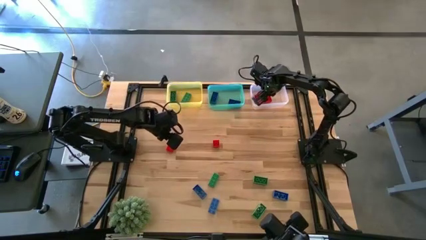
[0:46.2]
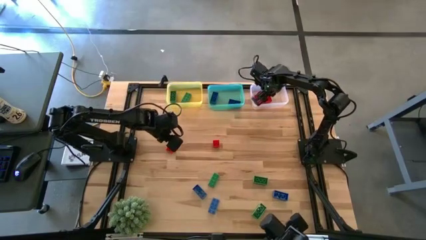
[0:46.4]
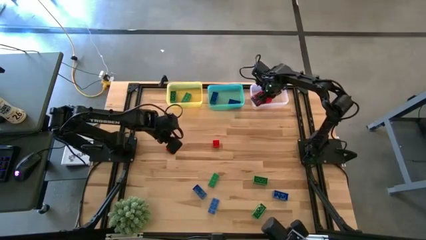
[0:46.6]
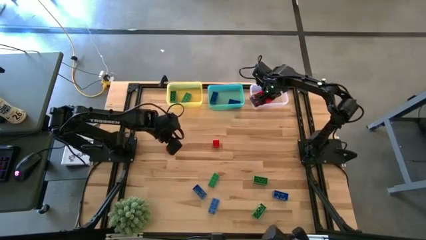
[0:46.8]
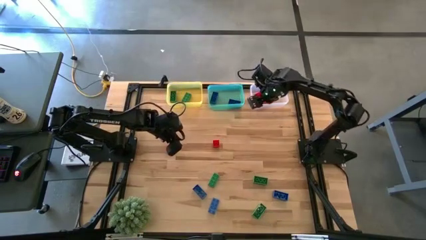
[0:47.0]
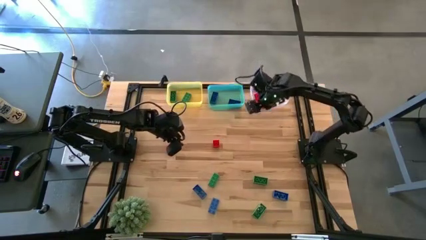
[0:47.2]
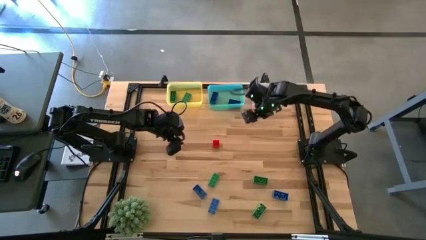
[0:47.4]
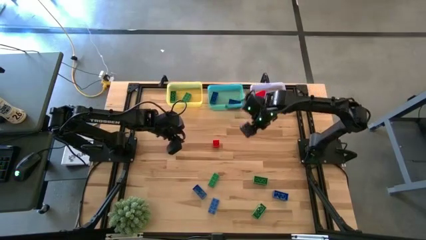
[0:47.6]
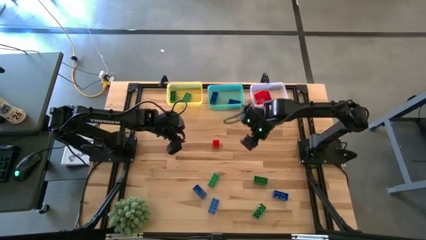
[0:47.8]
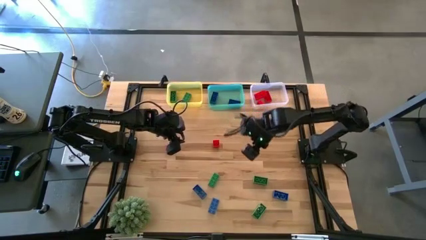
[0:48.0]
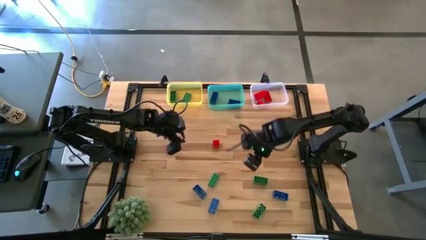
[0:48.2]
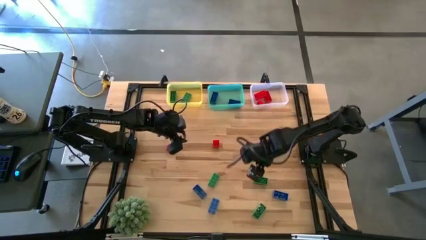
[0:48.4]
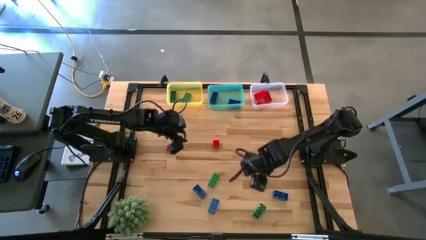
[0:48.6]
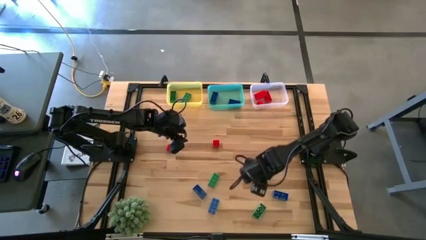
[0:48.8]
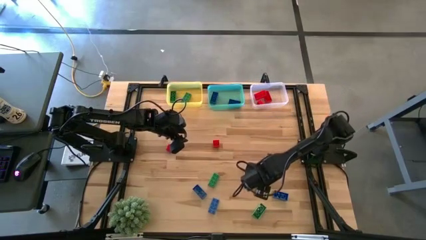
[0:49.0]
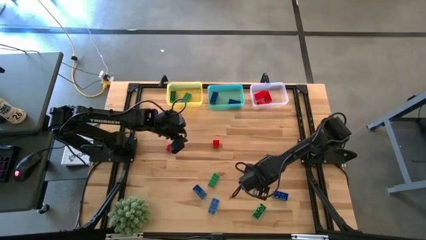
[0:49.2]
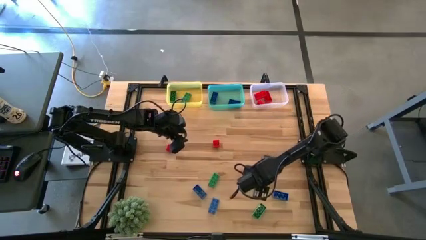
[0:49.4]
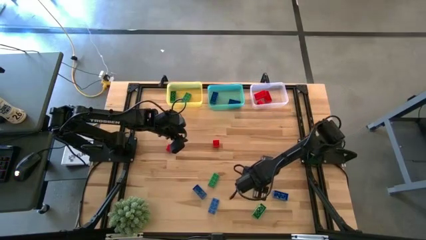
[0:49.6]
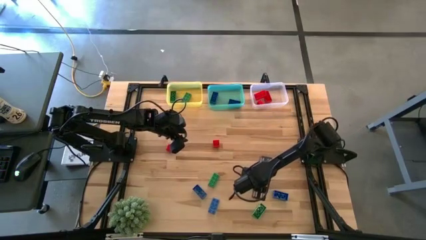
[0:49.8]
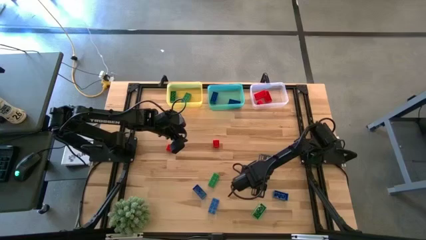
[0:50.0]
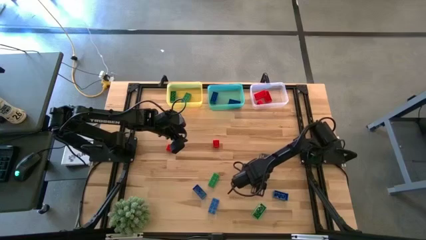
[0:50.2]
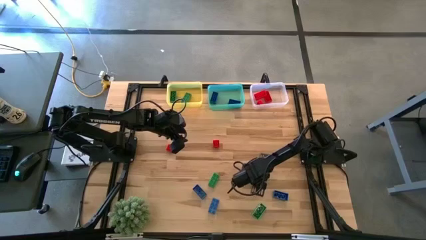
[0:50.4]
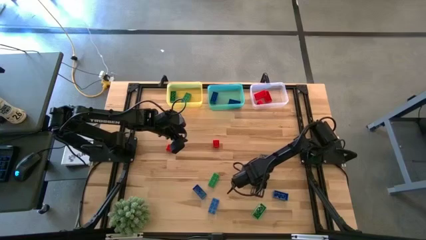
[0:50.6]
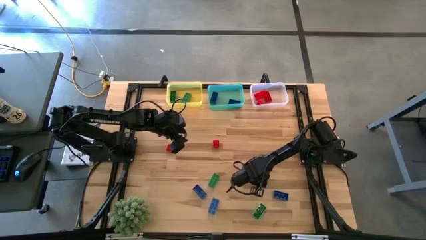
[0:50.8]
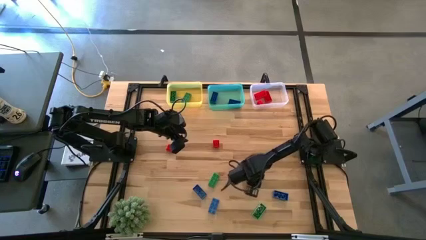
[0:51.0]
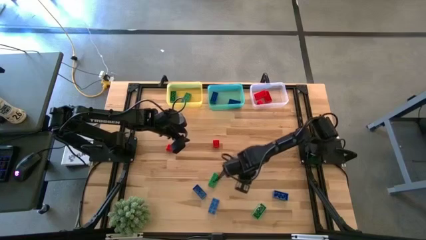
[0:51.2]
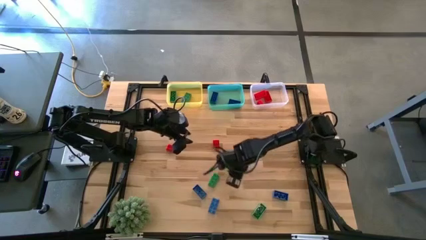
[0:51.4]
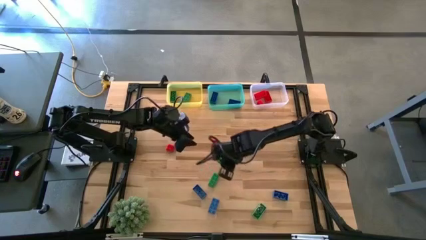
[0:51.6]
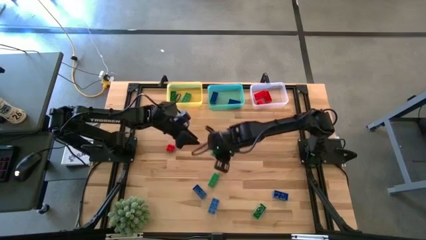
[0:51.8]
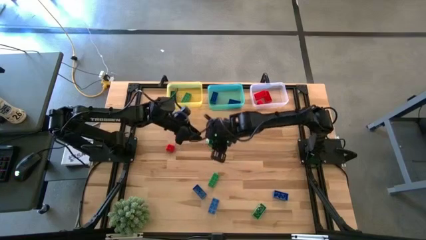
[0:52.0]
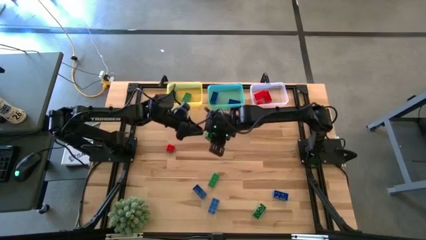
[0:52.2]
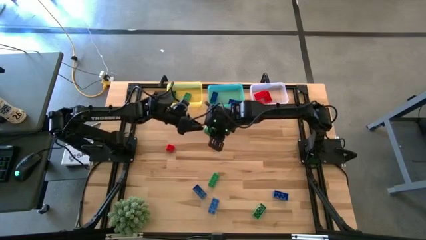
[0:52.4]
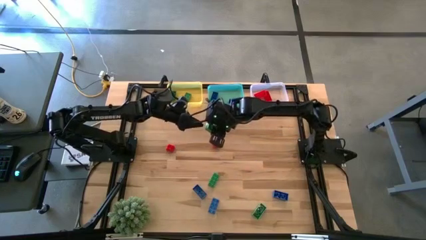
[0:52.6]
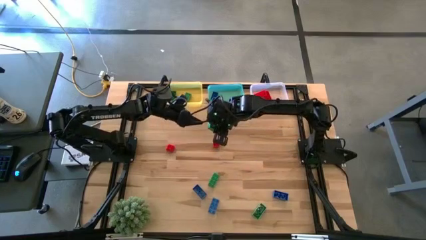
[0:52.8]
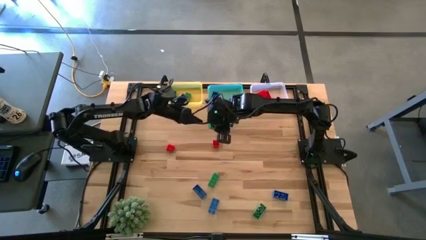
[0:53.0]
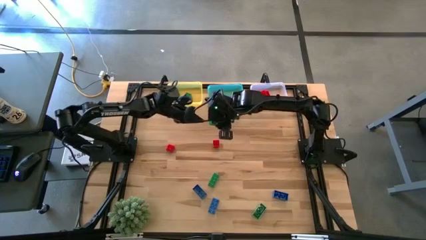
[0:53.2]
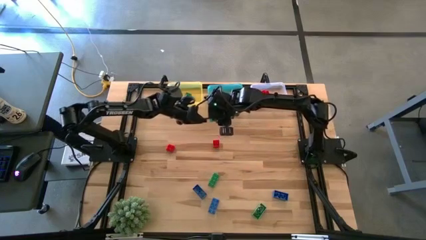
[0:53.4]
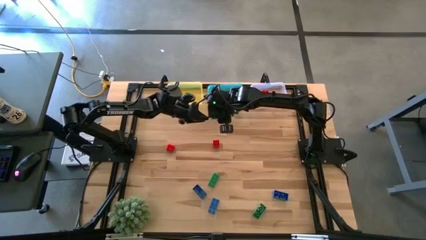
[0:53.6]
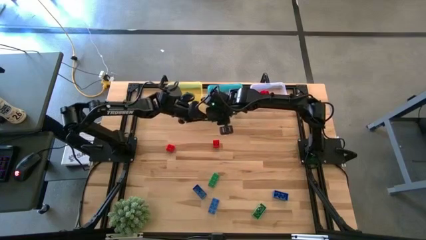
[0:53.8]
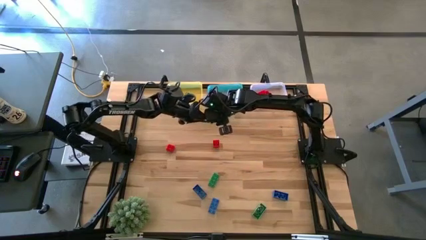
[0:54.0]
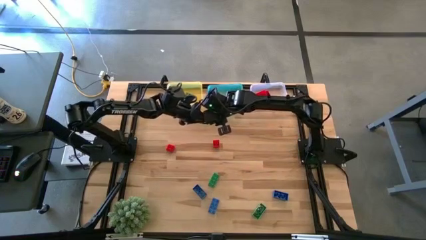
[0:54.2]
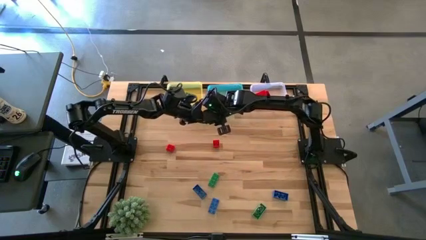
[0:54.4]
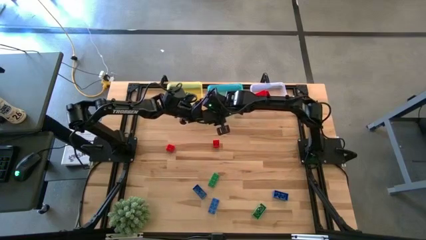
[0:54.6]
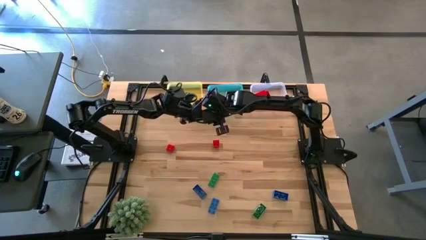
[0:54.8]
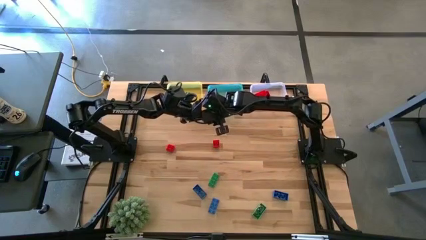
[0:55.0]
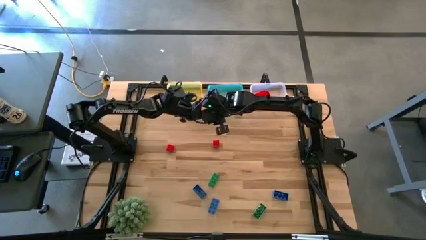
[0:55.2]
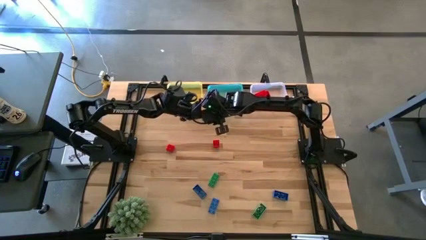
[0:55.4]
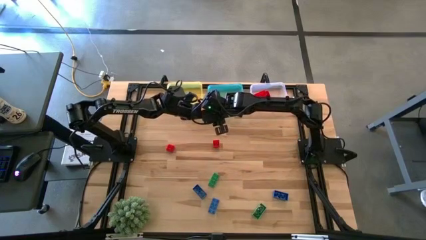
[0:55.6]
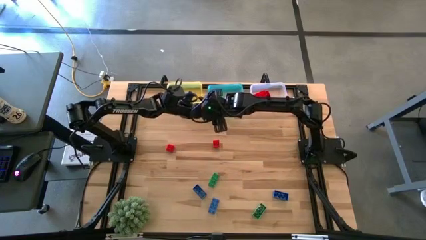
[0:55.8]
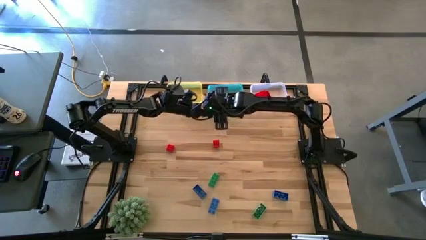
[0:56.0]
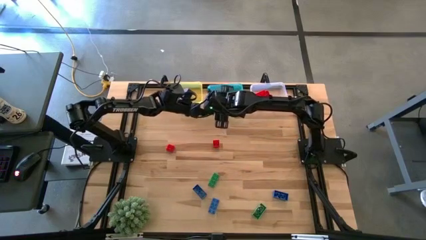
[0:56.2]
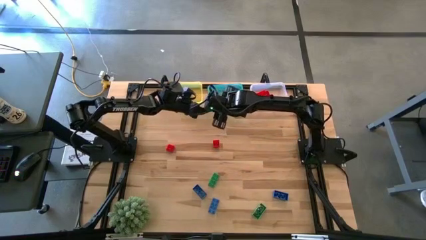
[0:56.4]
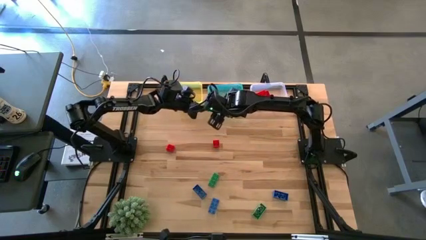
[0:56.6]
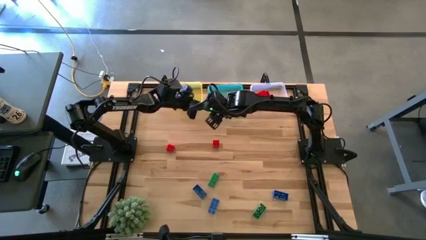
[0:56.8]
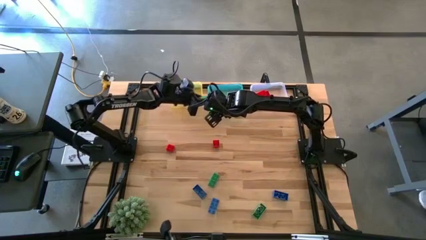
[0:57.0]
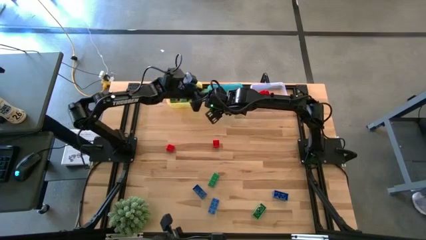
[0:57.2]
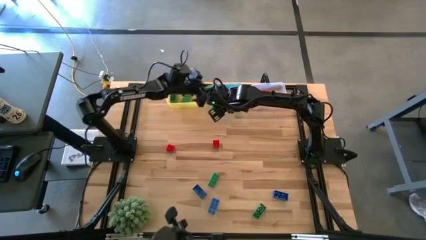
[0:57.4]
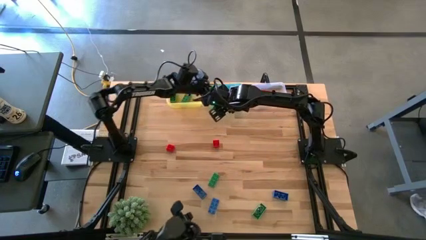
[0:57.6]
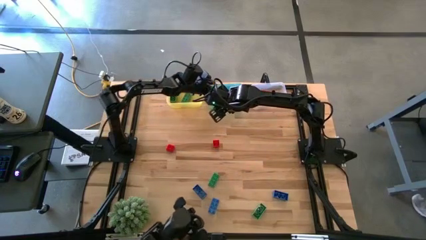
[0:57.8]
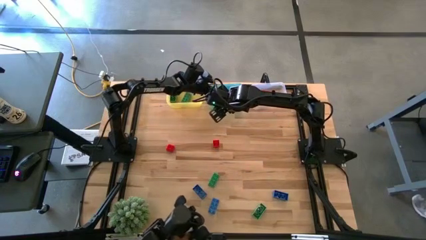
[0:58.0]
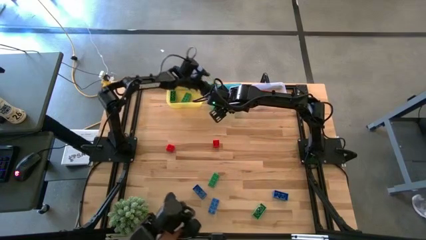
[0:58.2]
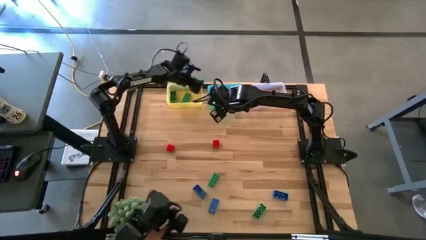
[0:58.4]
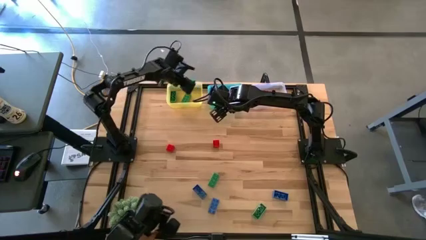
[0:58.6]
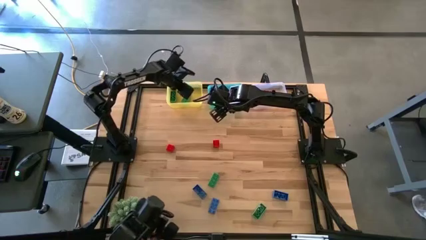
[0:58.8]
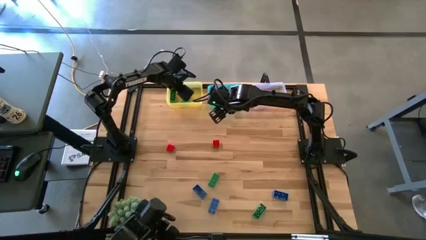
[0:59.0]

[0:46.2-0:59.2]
Task: Sort & place blocks by color
Put the green game piece into the yellow bin

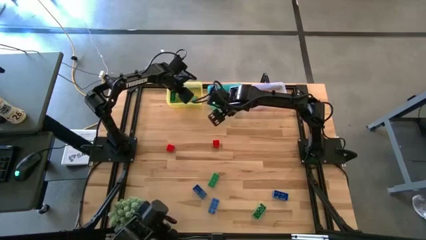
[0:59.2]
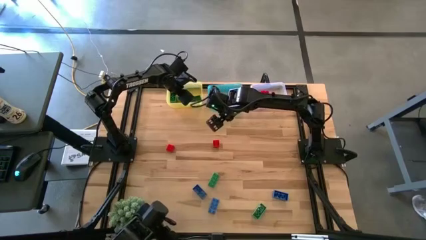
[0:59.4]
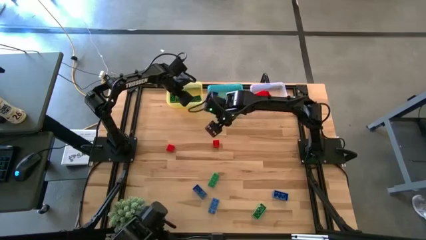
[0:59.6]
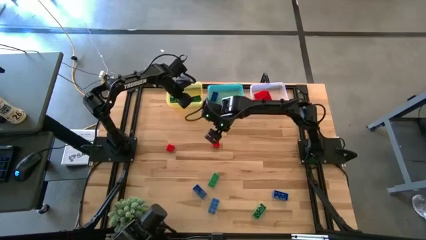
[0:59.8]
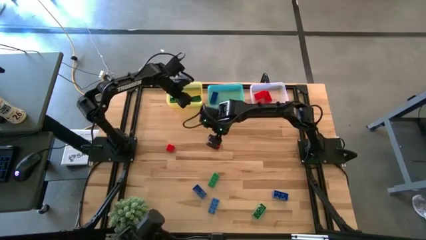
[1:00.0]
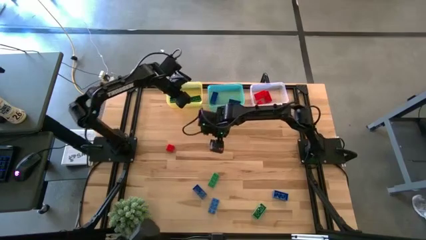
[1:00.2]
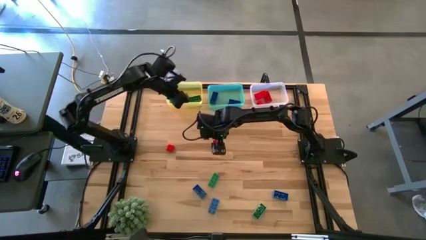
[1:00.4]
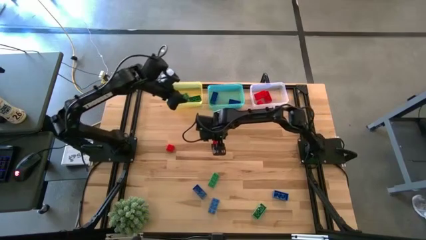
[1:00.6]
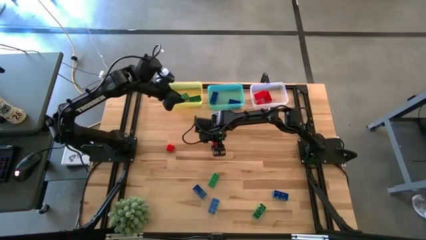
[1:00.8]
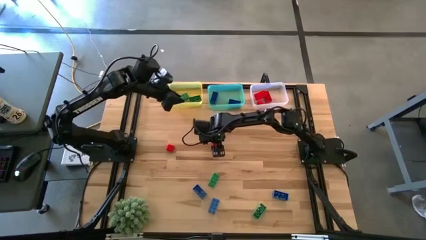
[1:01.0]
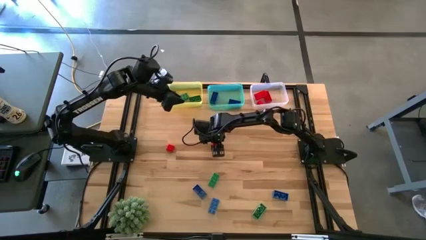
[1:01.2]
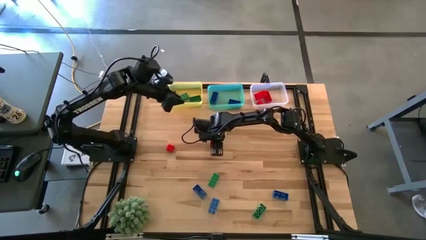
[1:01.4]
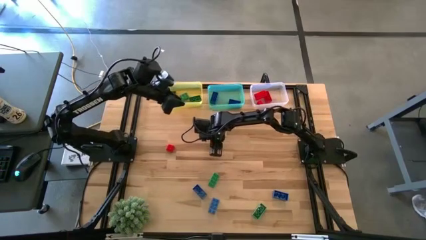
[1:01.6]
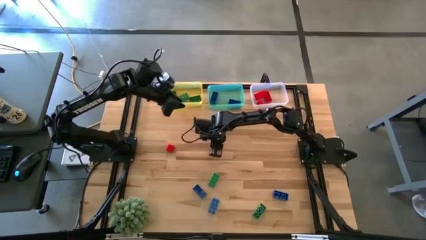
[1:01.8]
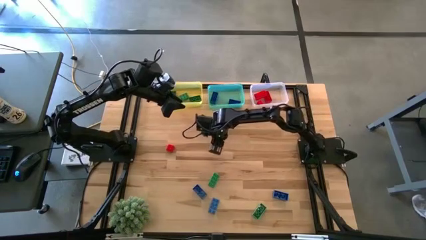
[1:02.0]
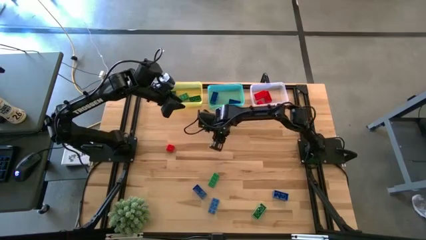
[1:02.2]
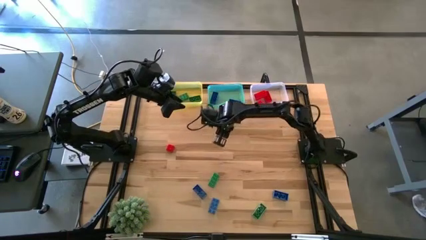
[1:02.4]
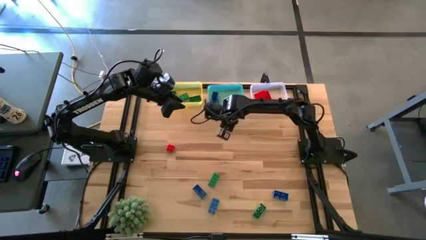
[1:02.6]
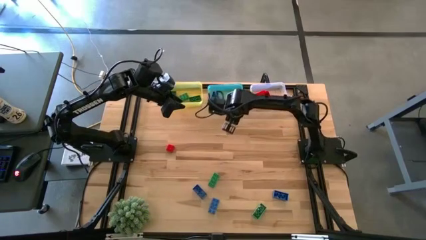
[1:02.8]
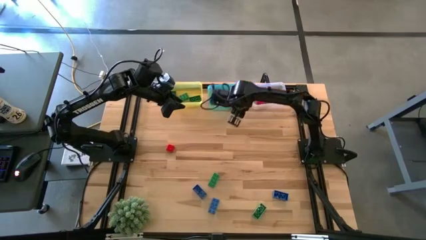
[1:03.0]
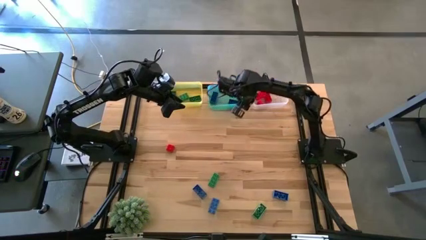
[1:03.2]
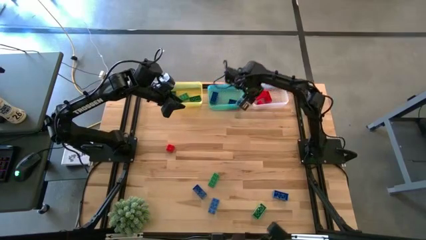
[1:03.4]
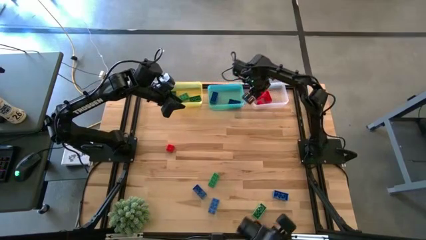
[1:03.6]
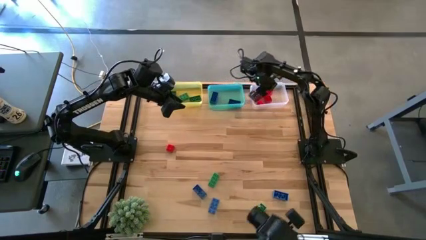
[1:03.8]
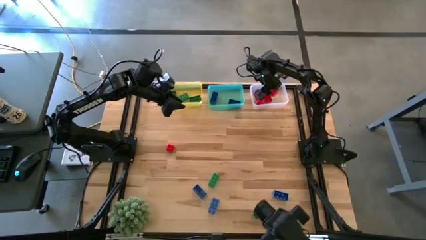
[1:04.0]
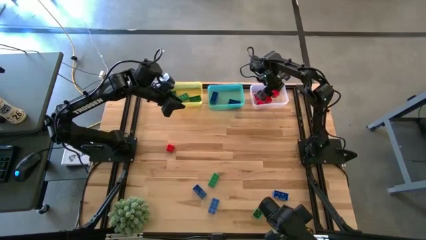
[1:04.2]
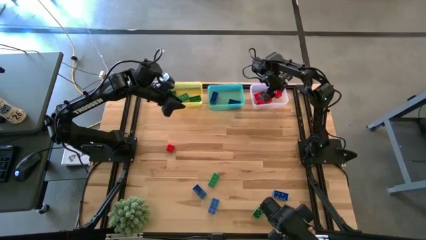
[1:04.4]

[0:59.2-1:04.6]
Put the red game piece into the white bin
